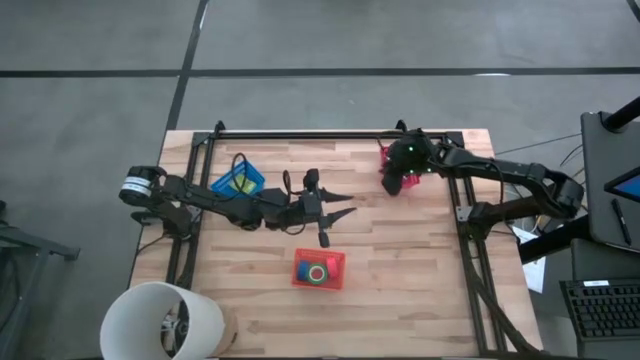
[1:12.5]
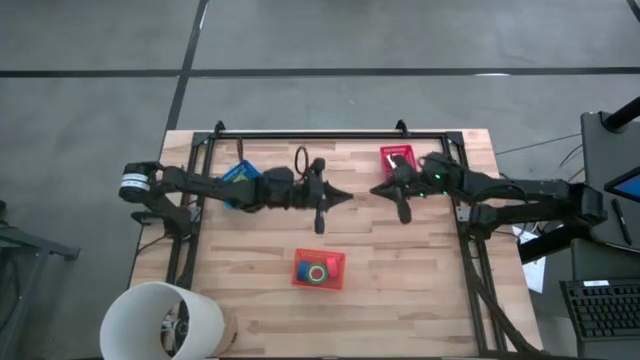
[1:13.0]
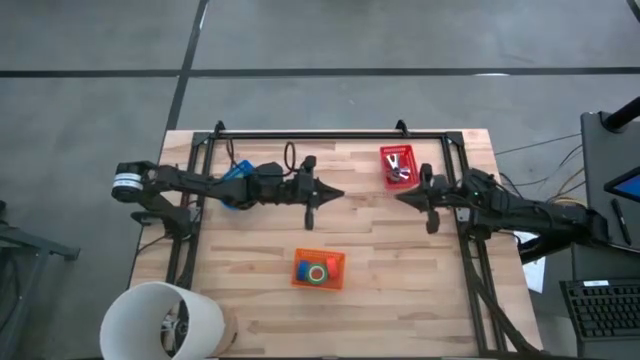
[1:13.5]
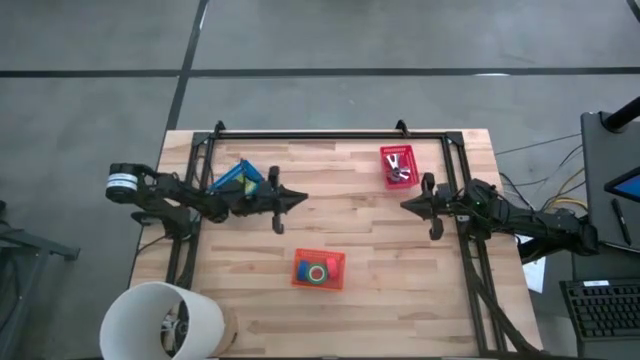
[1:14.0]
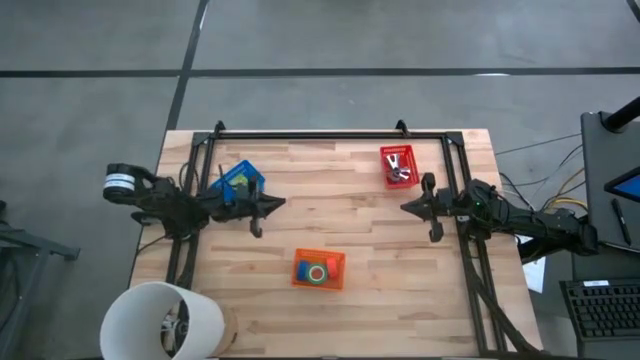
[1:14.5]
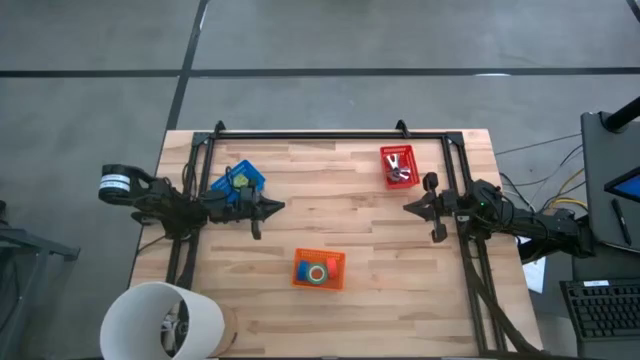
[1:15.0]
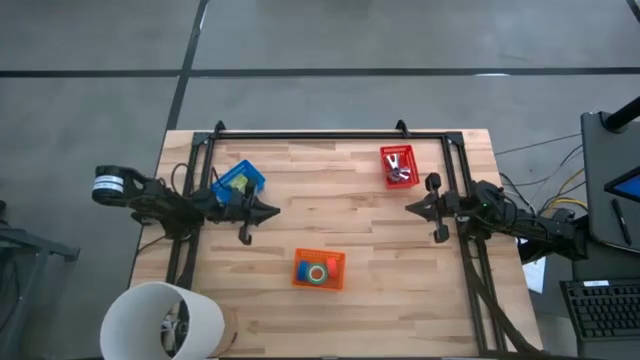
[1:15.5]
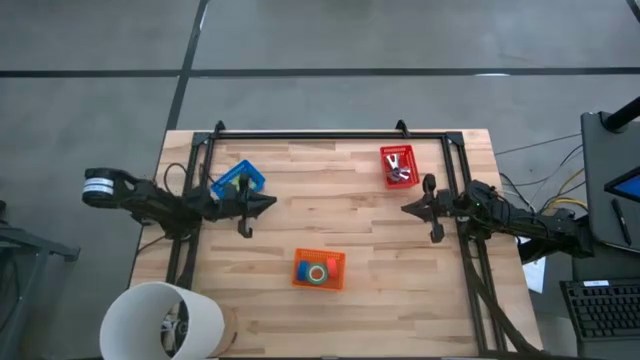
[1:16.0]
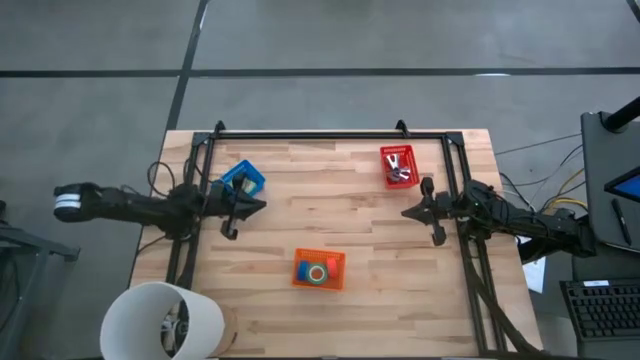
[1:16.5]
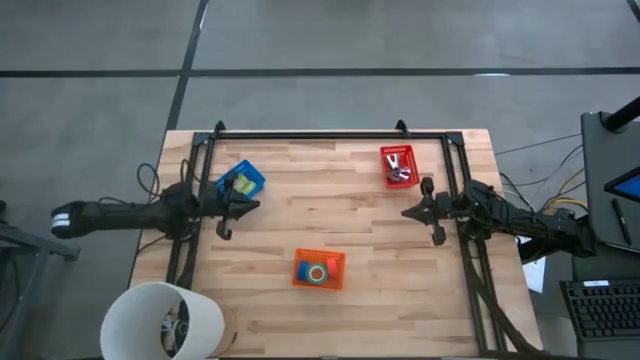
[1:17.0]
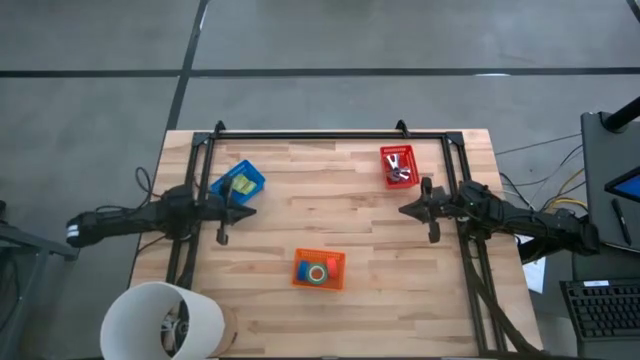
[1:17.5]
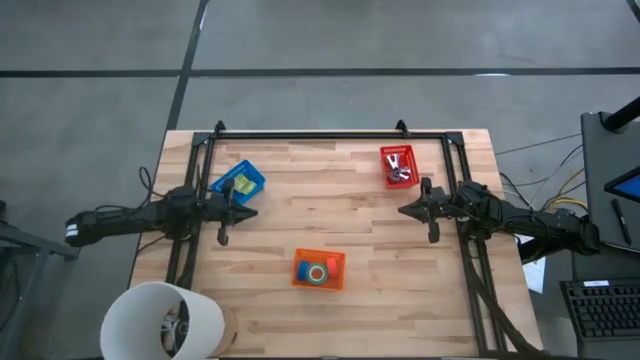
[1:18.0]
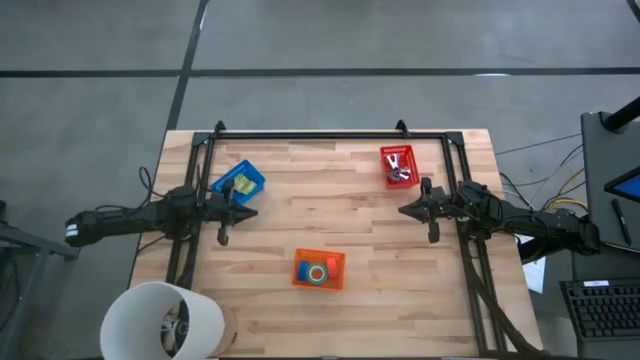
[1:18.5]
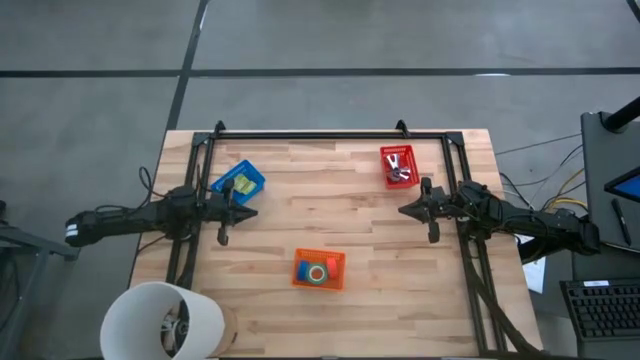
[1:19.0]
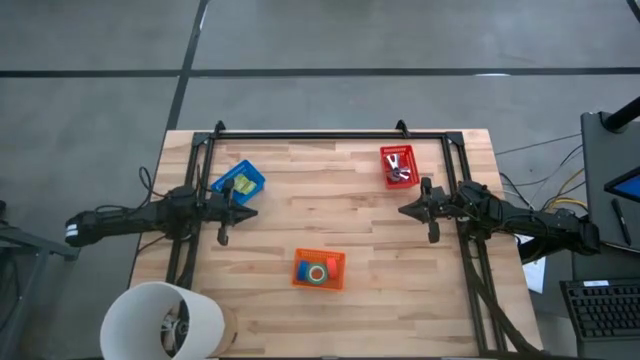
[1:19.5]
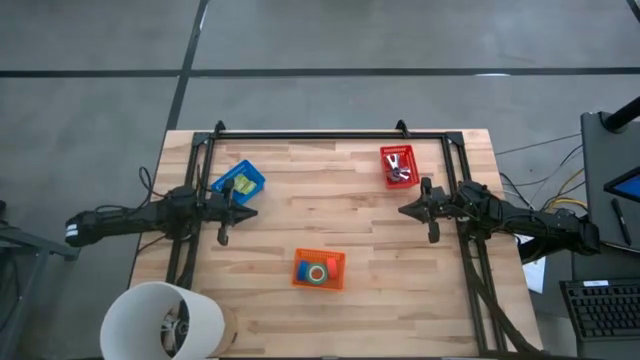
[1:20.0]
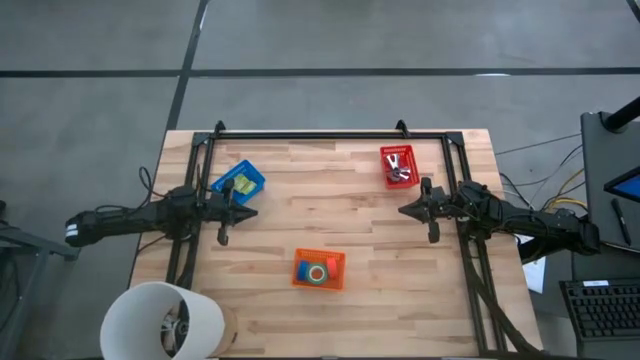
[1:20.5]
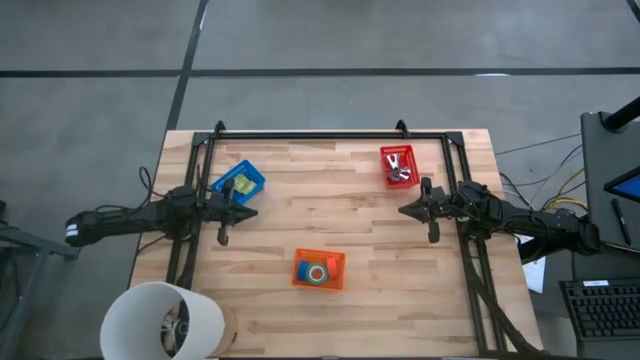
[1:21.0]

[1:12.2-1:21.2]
Task: Pick and place Stapler, Stapler remover, tape
Return to Home Position

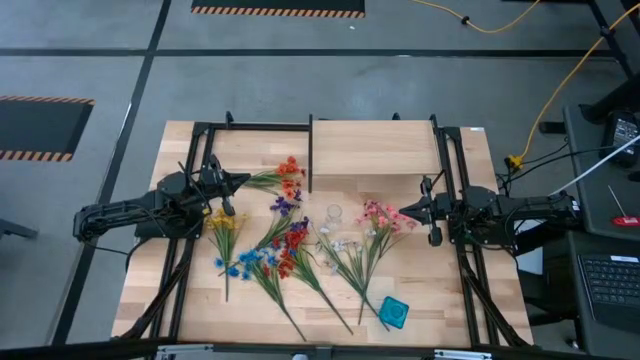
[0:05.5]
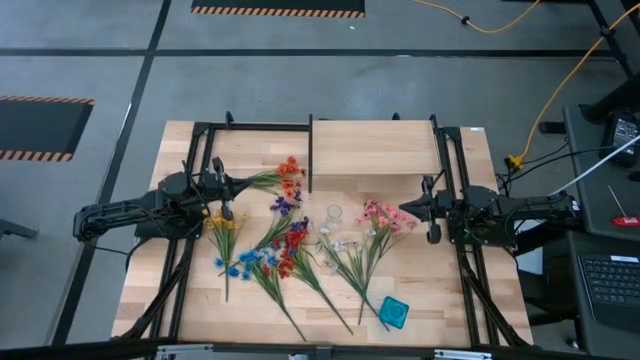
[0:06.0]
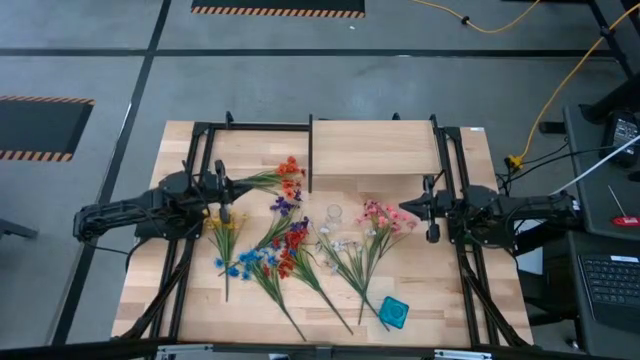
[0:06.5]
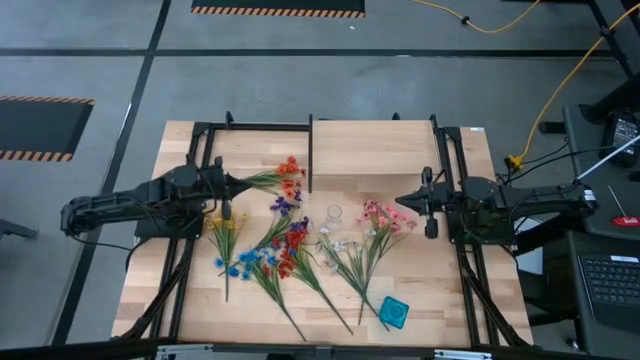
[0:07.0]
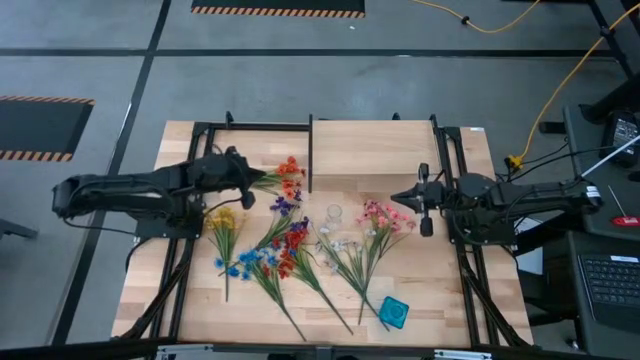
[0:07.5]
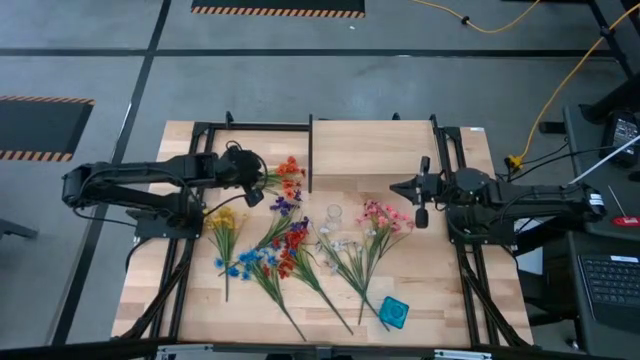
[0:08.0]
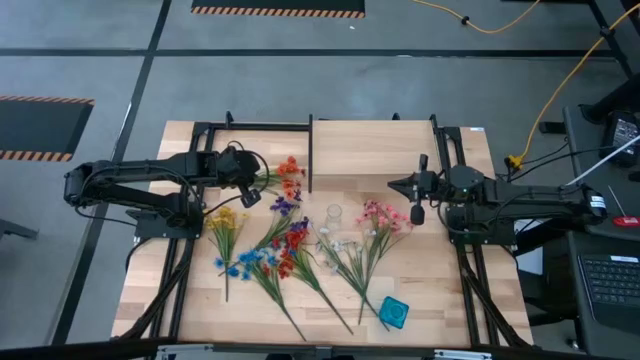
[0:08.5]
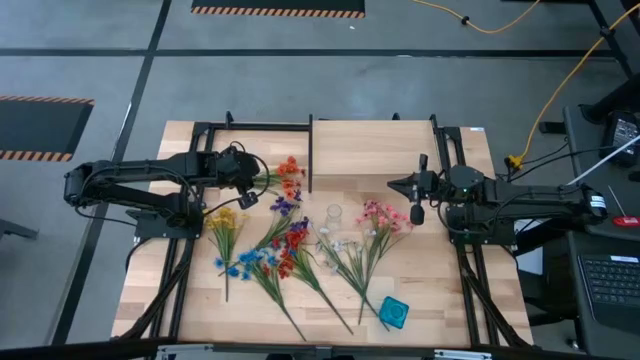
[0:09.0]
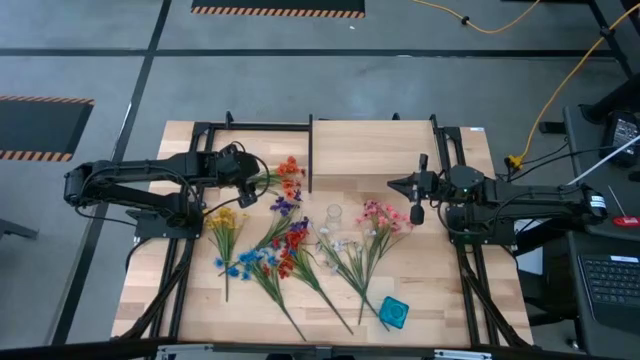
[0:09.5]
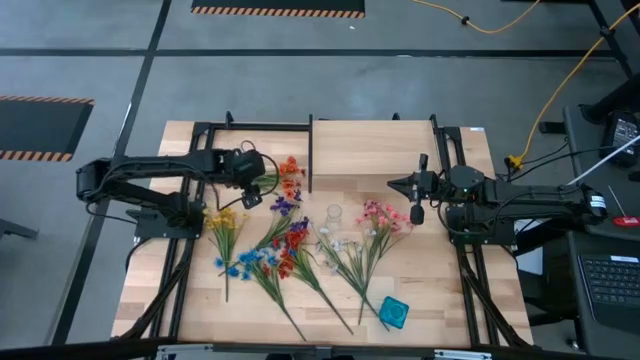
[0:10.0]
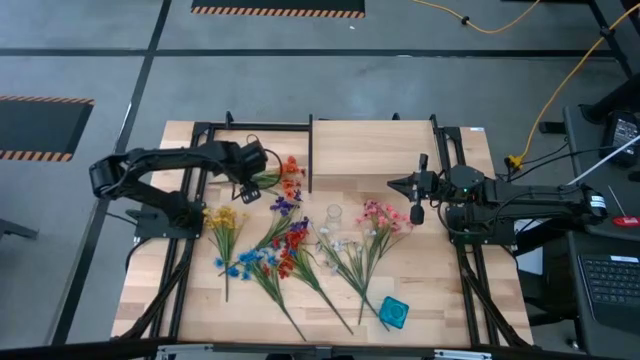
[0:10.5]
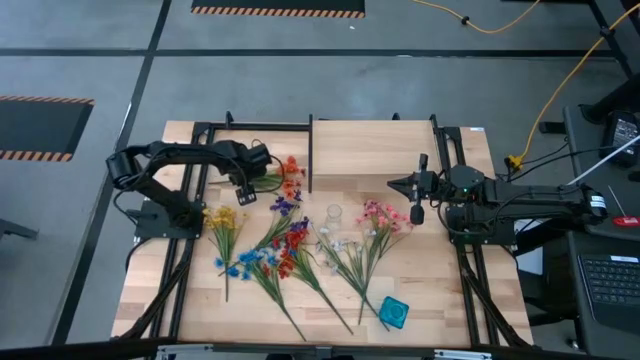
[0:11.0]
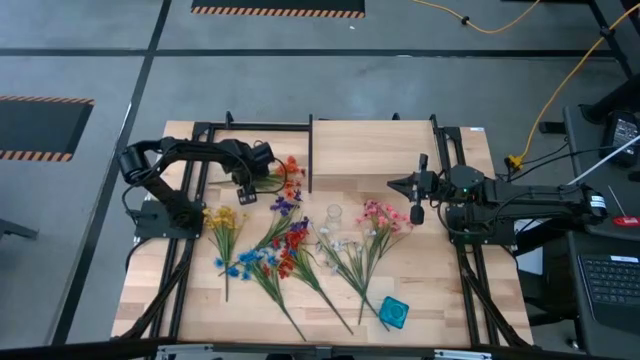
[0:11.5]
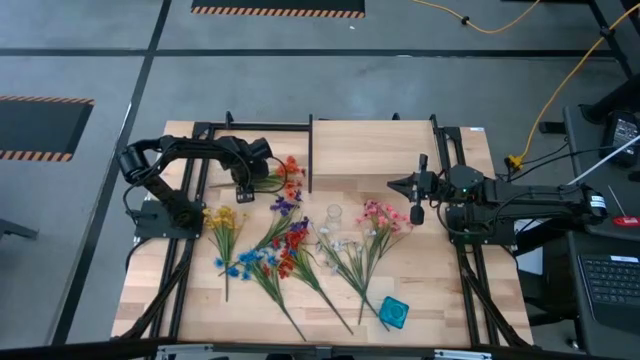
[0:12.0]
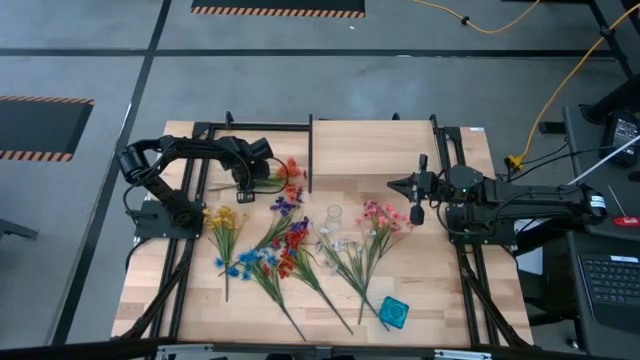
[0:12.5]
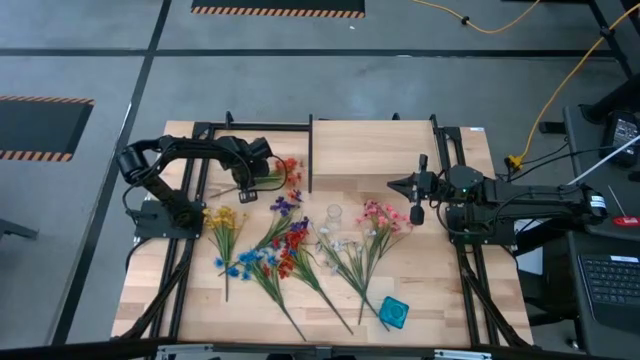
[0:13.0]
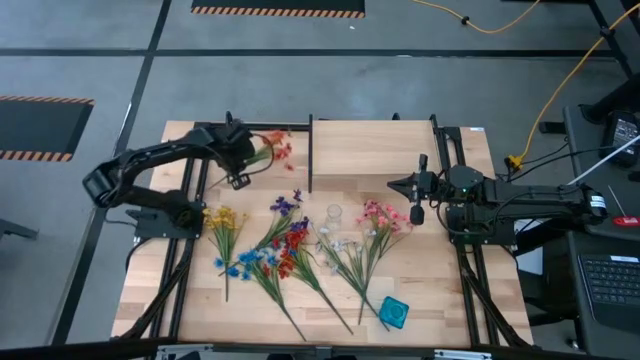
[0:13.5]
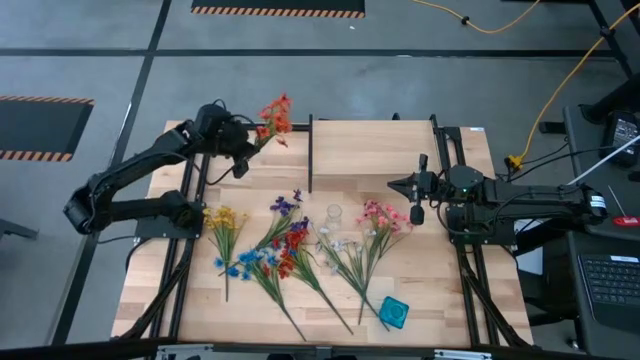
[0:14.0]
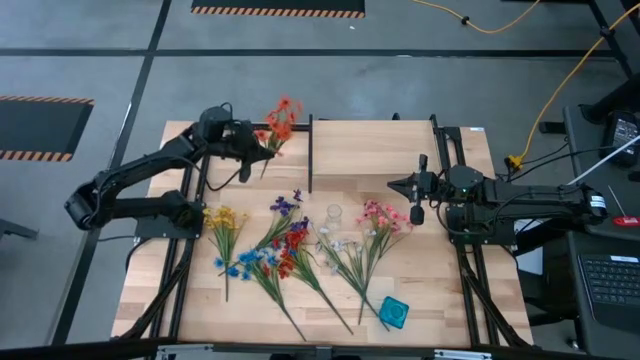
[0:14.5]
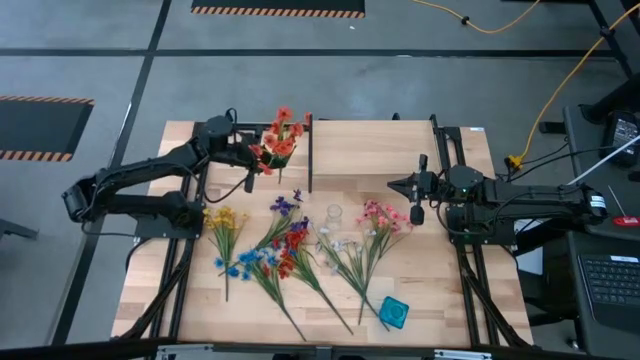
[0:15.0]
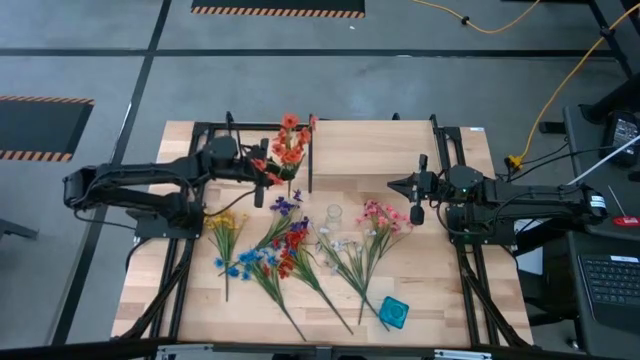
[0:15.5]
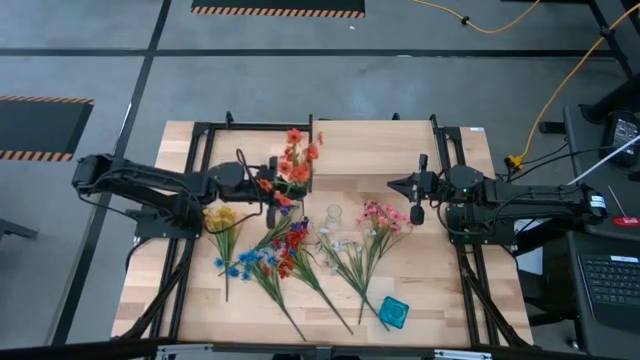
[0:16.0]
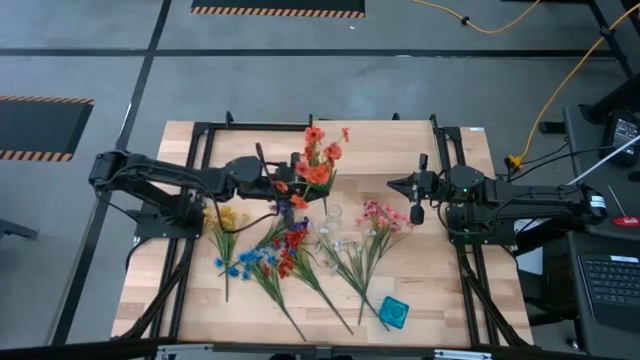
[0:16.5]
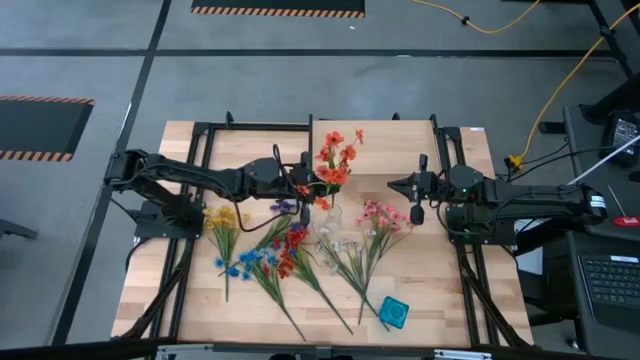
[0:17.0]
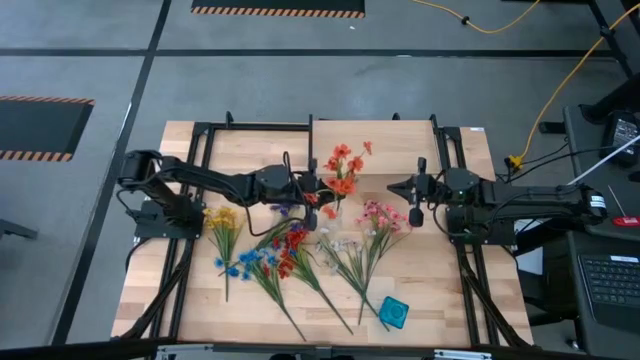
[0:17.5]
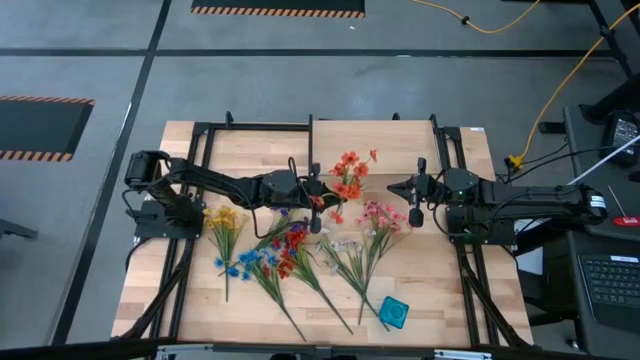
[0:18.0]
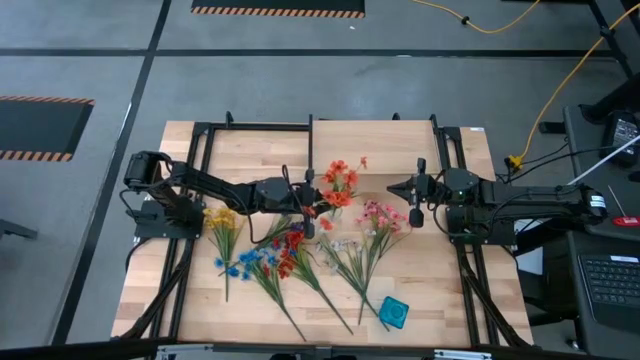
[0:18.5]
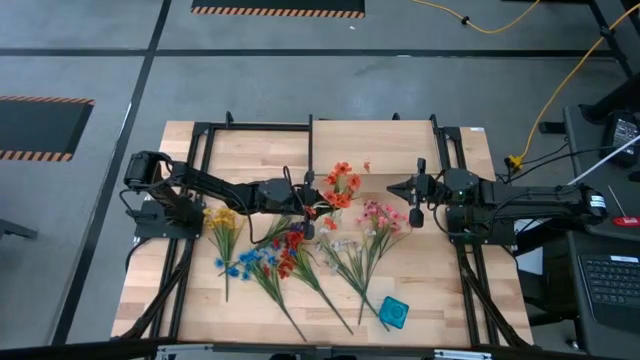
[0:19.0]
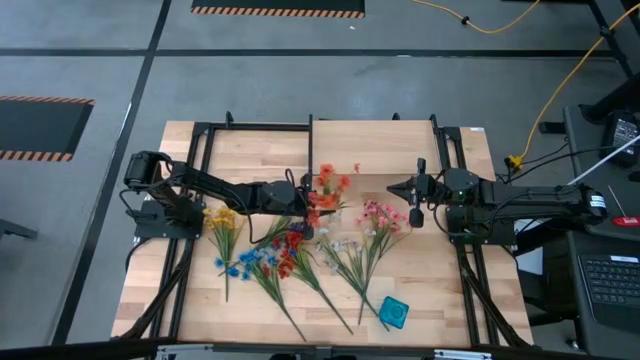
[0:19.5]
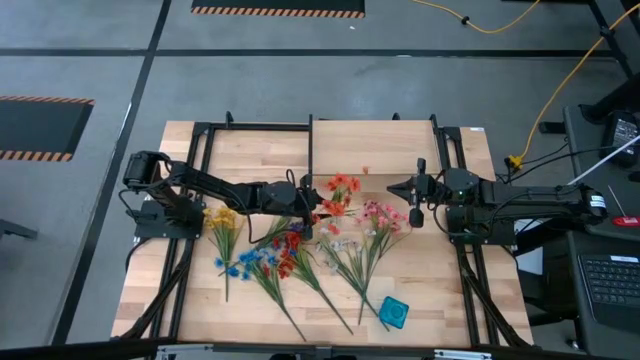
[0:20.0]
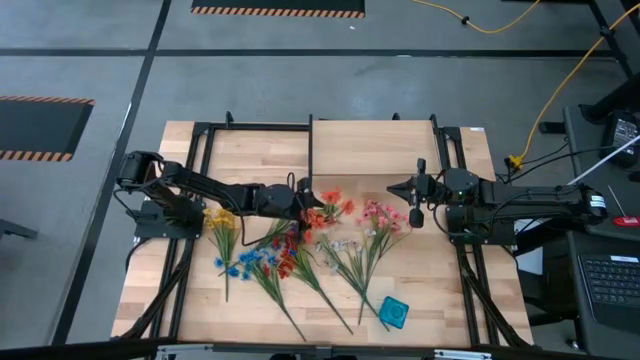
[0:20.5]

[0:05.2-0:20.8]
Task: Pick and place flowers into a vace then onto a shelf
Put the orange flowers into the transparent vase
